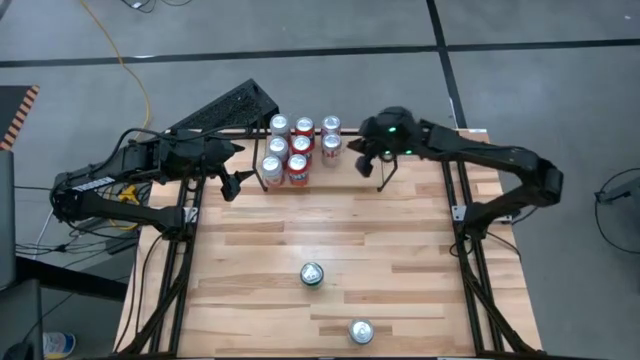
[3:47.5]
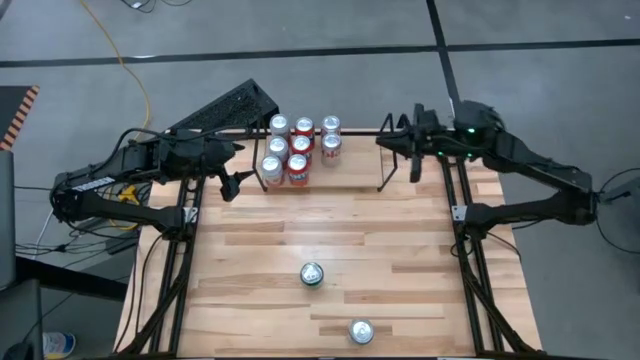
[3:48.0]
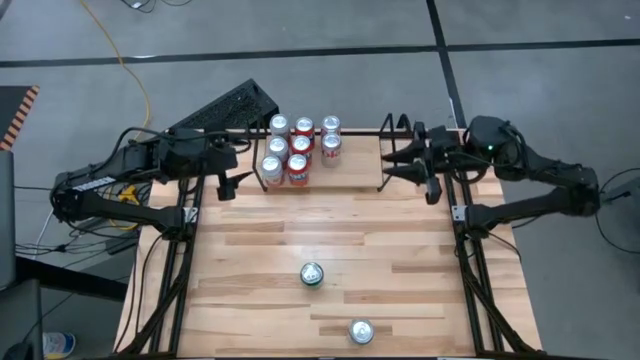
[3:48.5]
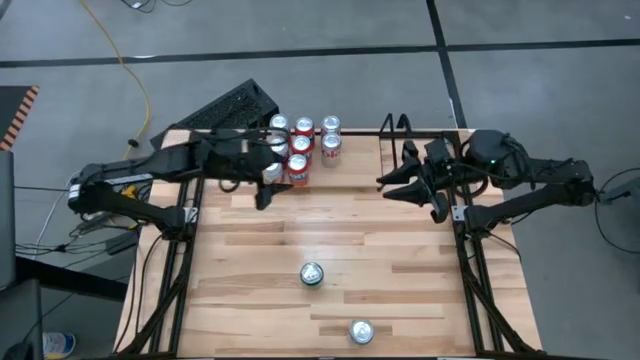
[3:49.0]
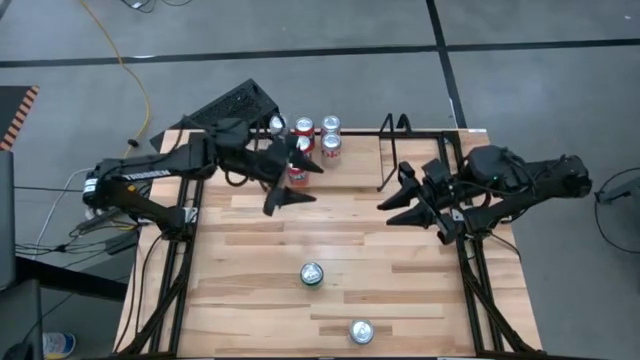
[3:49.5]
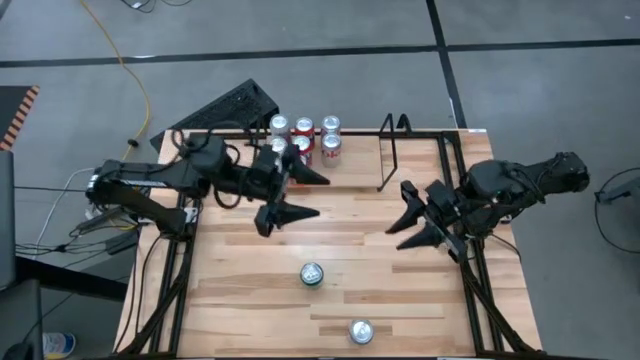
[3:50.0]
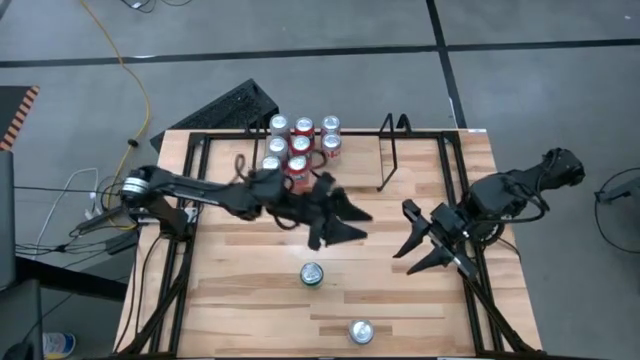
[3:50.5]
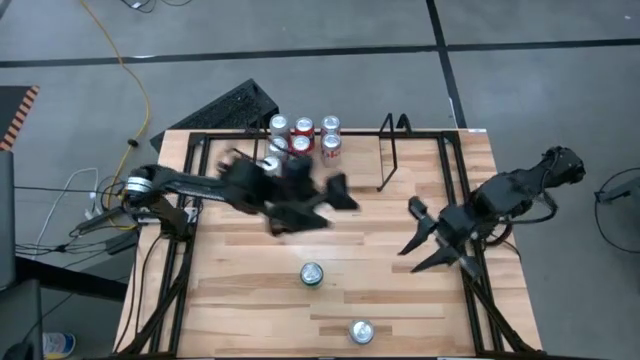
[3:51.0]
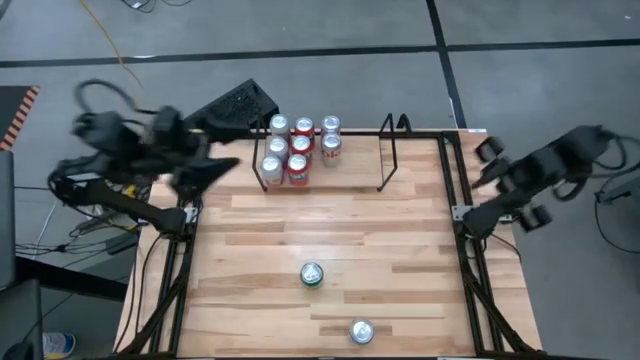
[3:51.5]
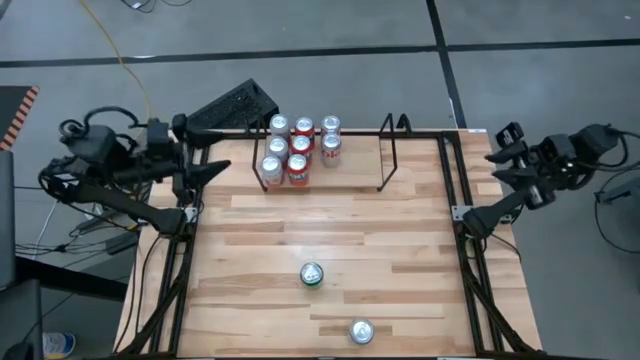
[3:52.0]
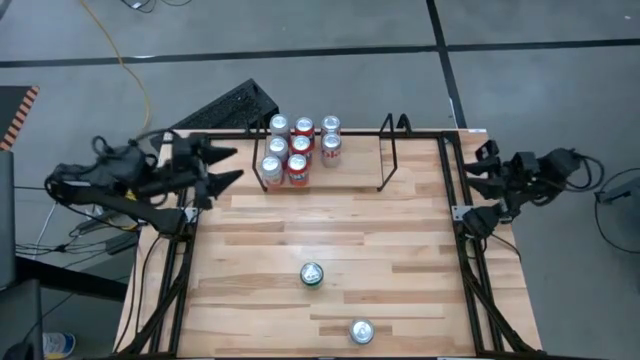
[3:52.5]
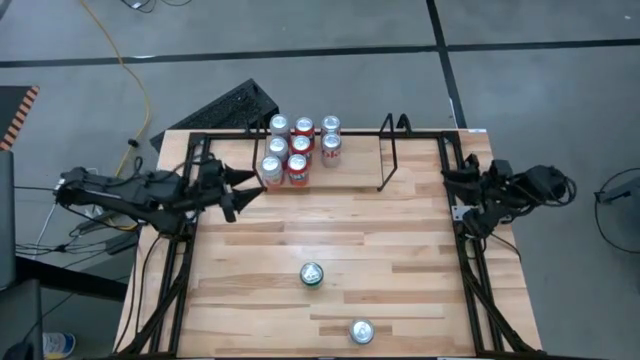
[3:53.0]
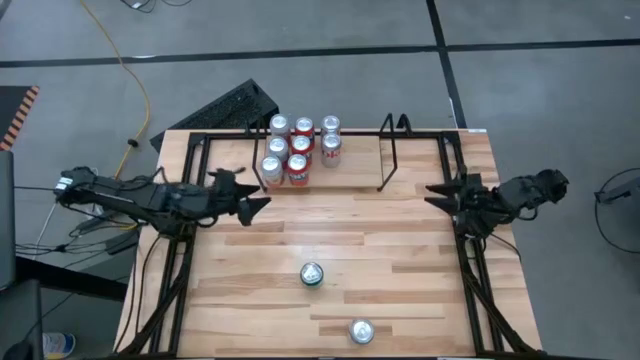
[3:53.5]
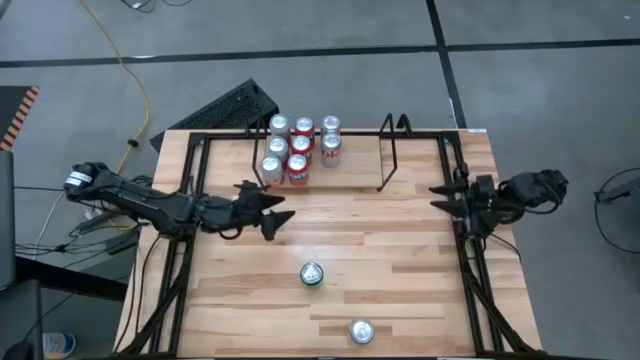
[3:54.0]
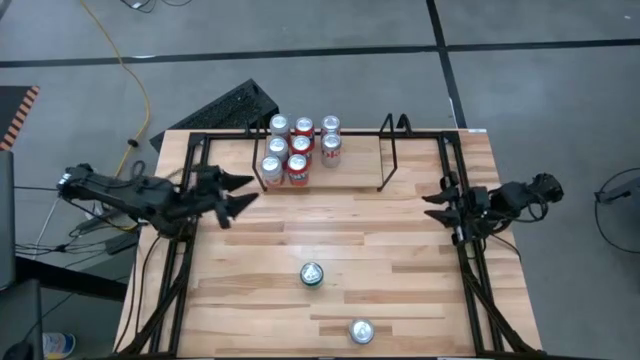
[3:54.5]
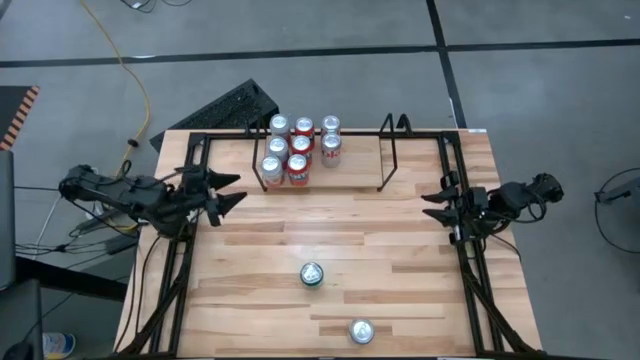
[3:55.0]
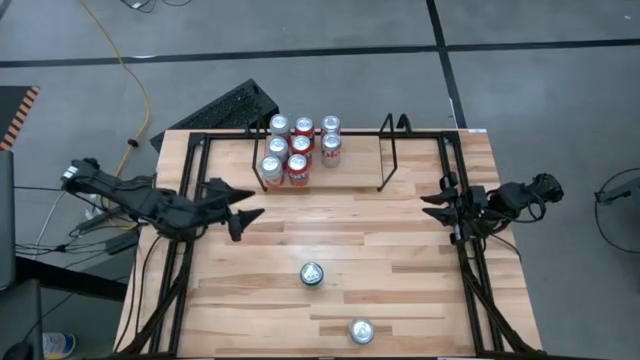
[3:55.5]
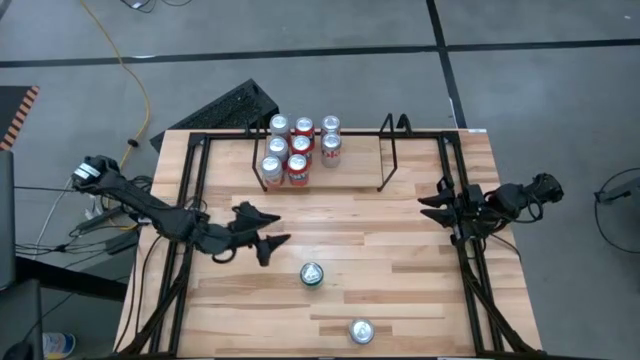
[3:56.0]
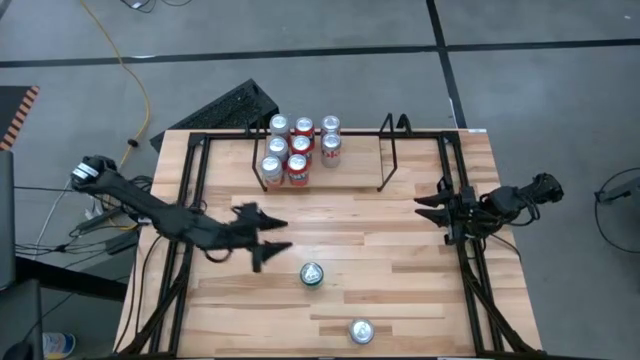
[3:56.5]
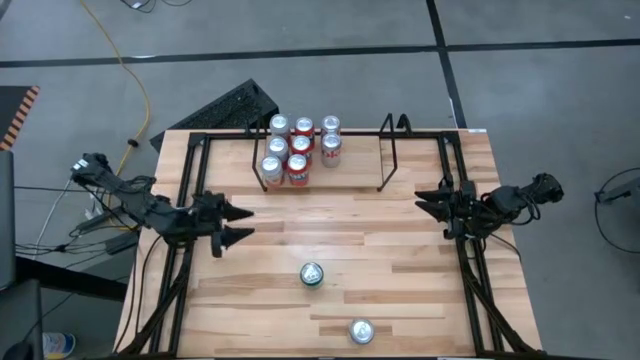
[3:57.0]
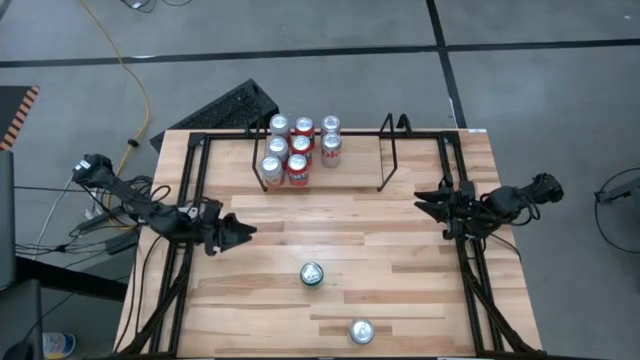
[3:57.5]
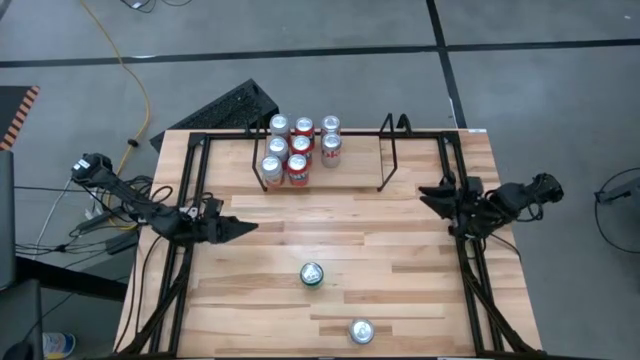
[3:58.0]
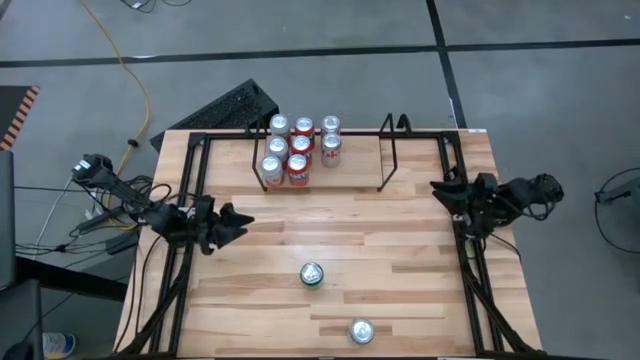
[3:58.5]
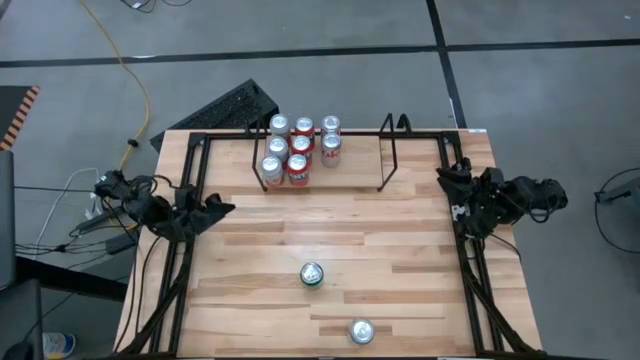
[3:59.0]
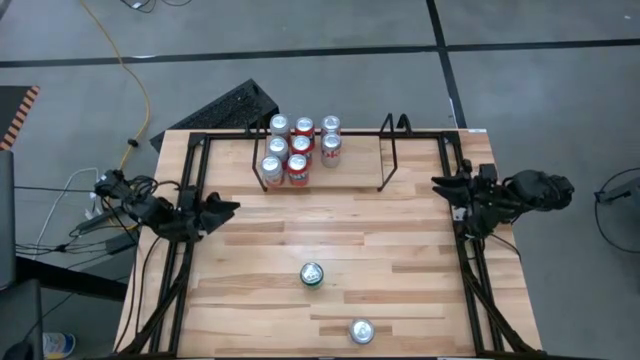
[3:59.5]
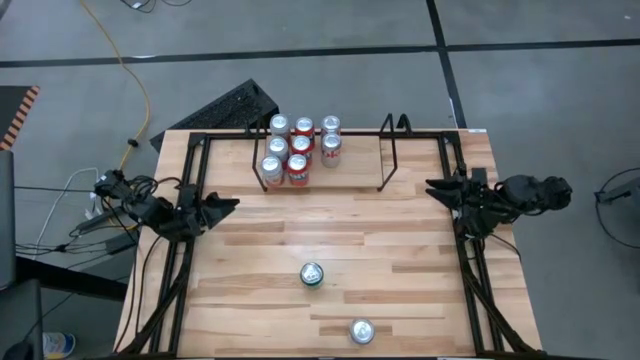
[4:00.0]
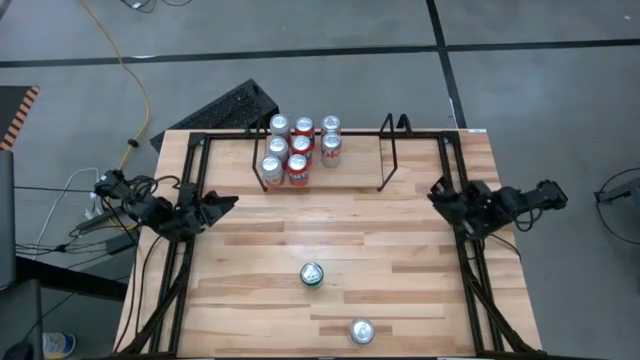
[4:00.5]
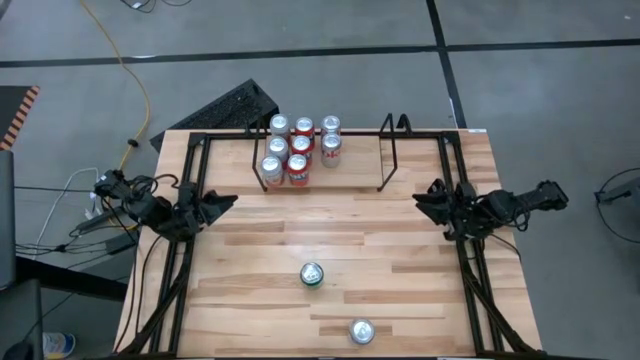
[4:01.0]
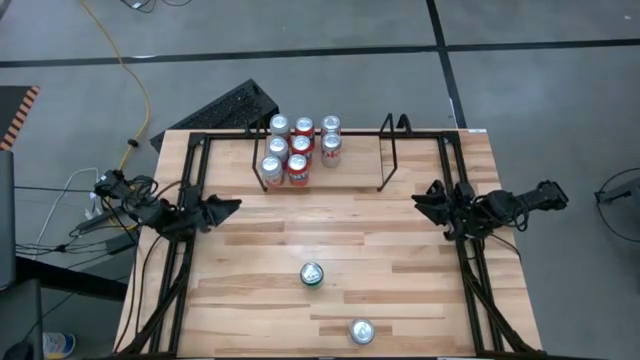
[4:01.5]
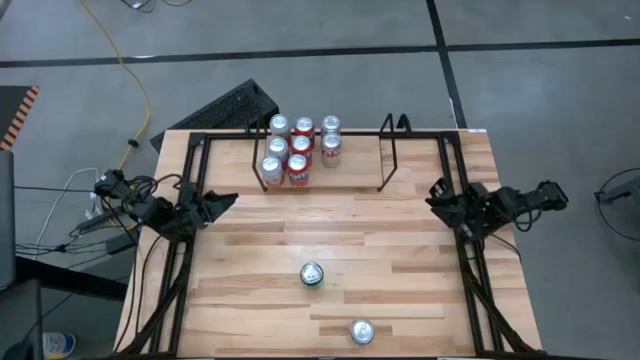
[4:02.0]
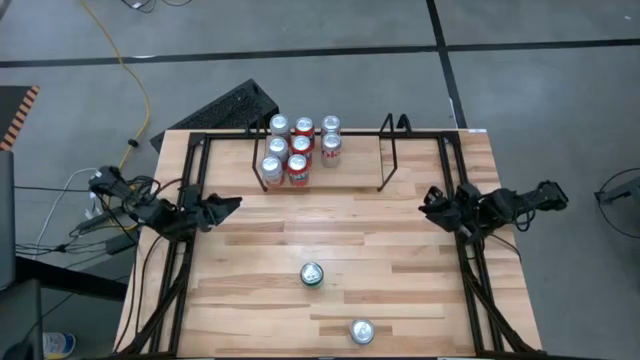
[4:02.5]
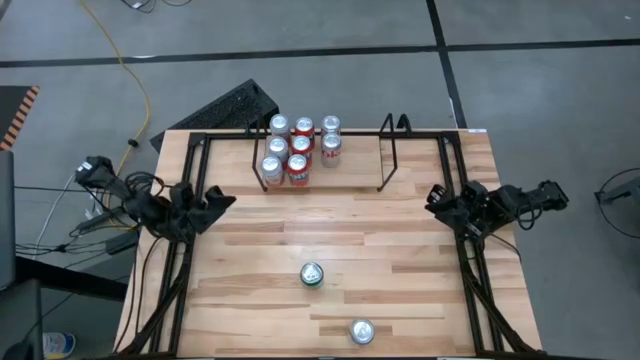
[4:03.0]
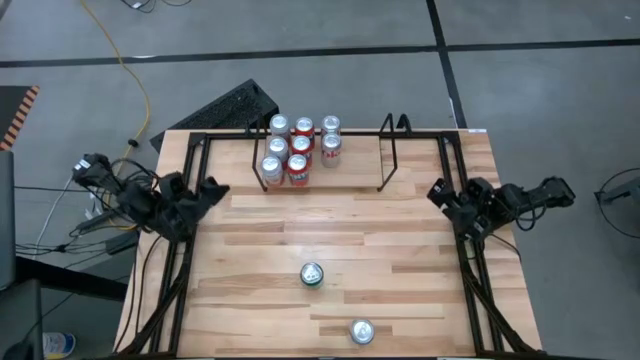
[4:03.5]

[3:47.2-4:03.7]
Task: Place canned beverage on shelf
Put the silver soda can on the shelf aligned with the other silver soda cans
